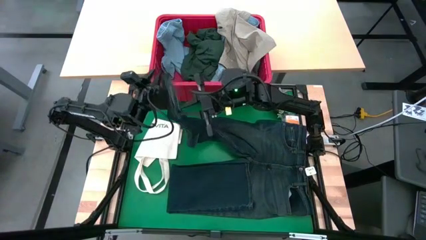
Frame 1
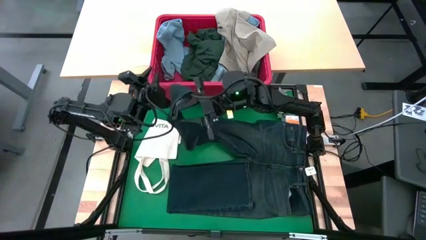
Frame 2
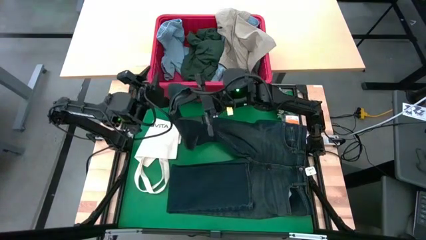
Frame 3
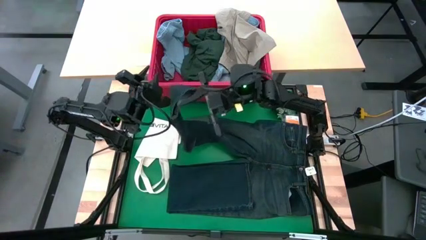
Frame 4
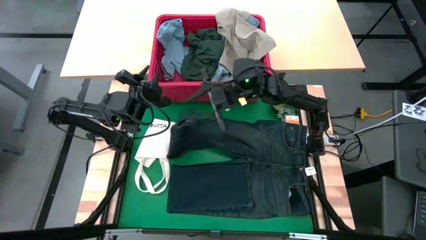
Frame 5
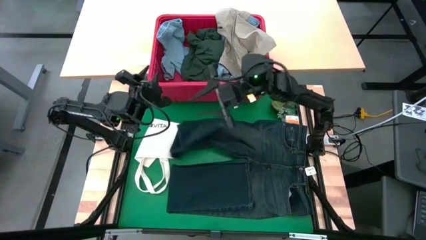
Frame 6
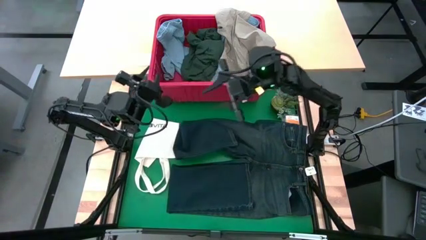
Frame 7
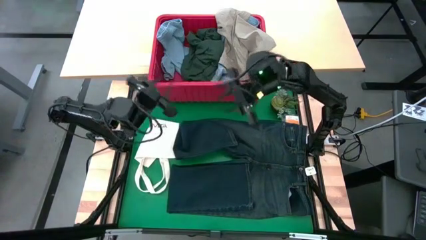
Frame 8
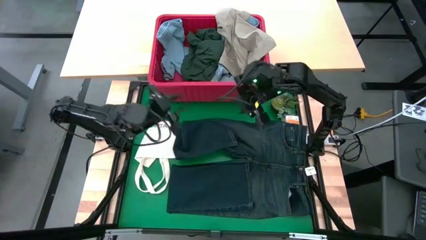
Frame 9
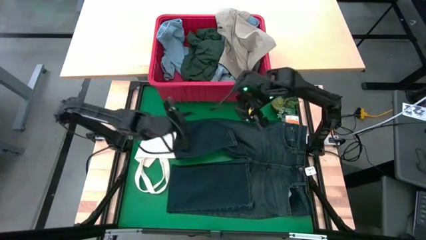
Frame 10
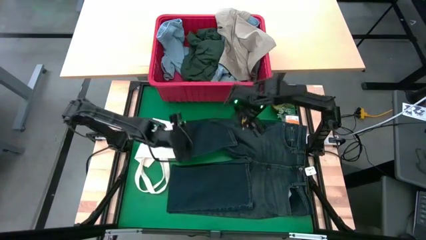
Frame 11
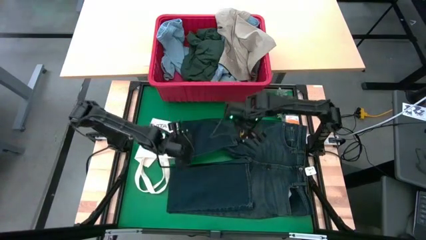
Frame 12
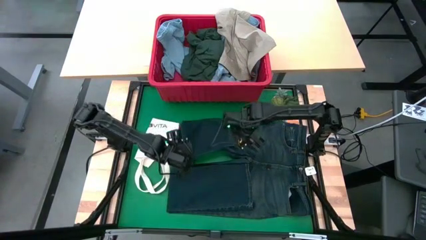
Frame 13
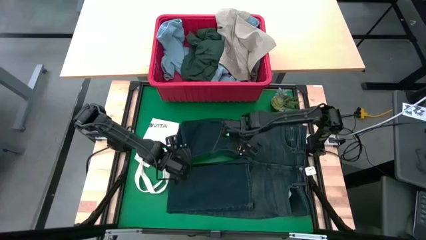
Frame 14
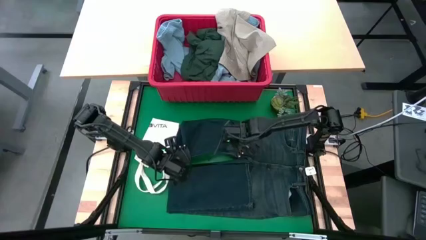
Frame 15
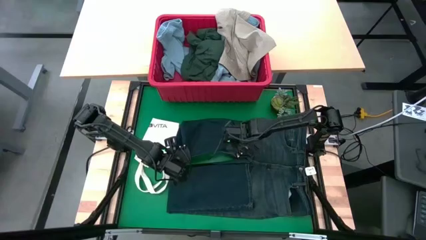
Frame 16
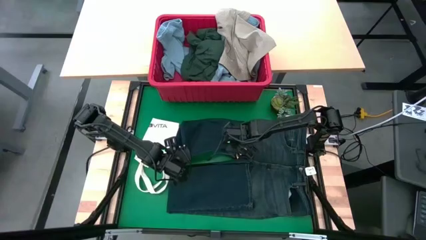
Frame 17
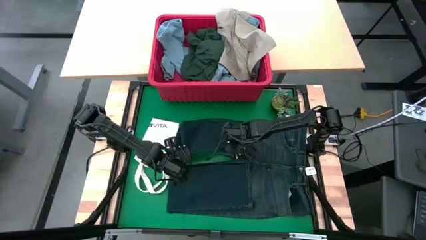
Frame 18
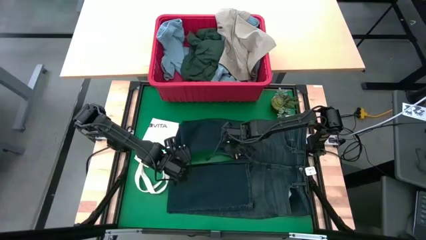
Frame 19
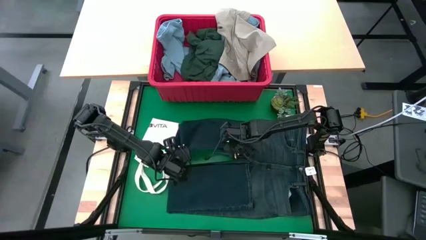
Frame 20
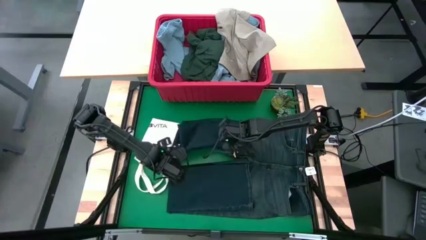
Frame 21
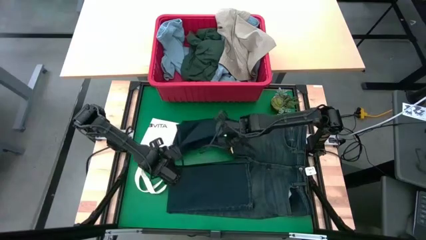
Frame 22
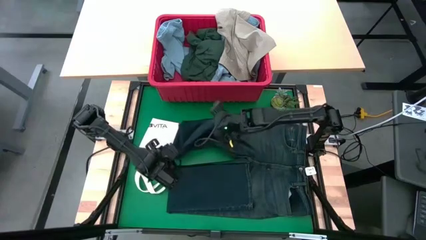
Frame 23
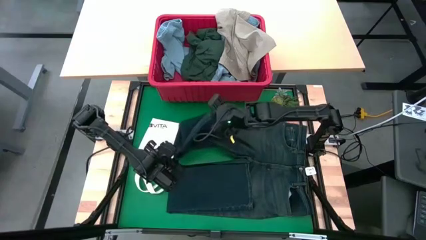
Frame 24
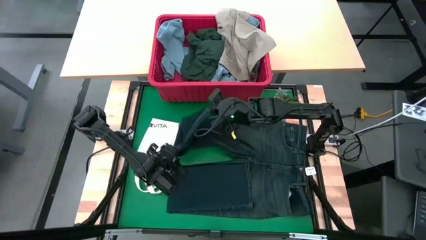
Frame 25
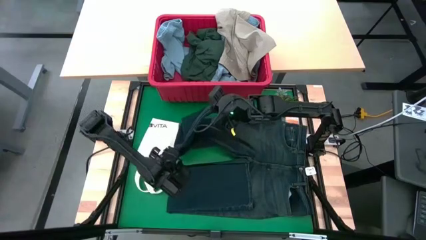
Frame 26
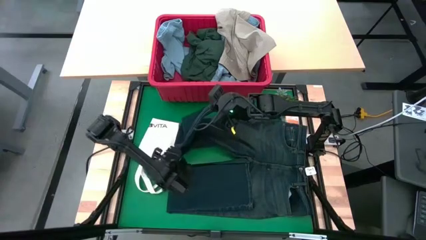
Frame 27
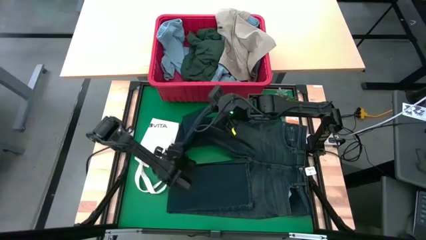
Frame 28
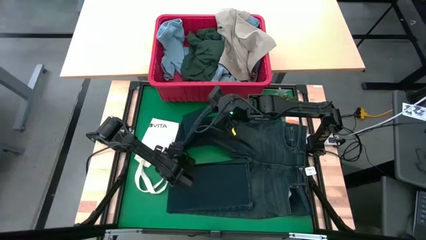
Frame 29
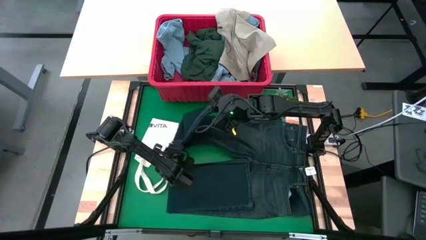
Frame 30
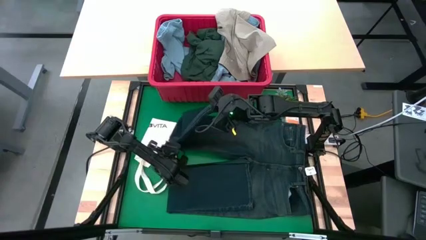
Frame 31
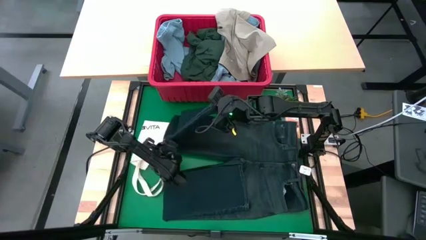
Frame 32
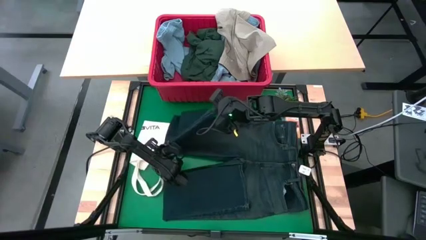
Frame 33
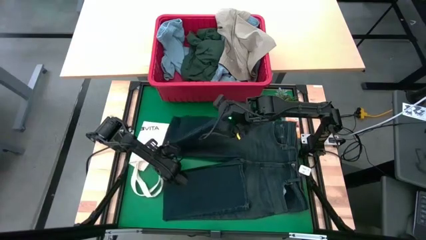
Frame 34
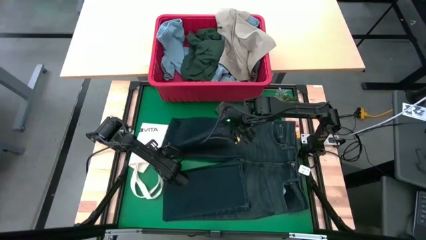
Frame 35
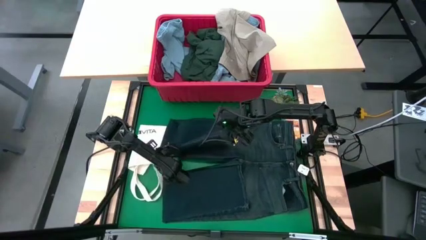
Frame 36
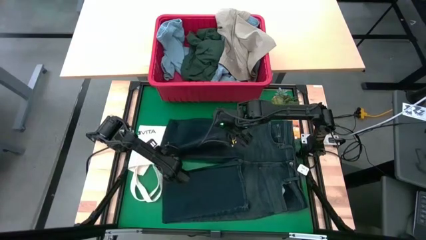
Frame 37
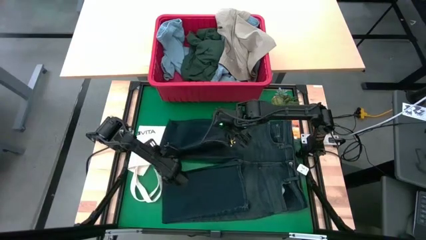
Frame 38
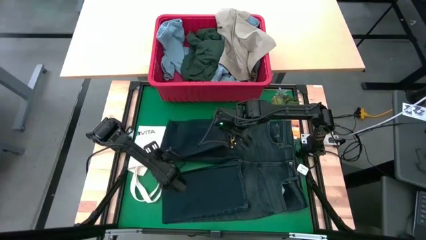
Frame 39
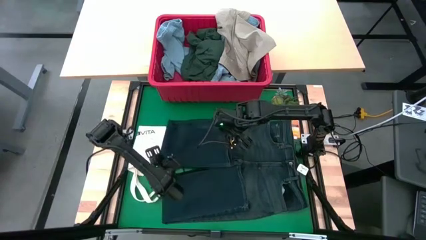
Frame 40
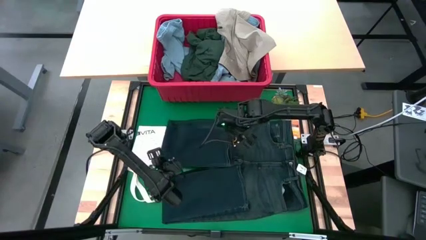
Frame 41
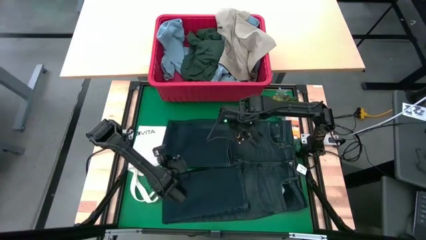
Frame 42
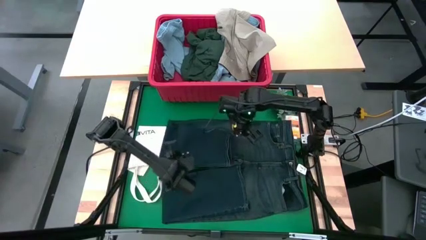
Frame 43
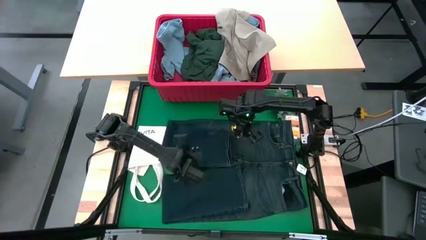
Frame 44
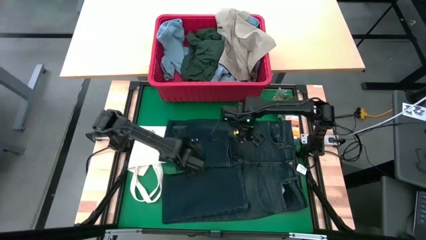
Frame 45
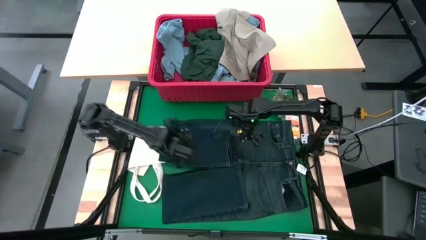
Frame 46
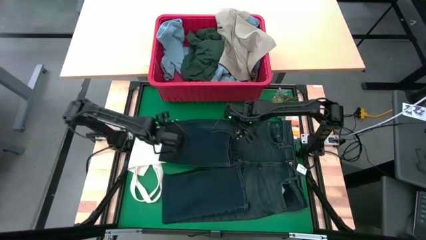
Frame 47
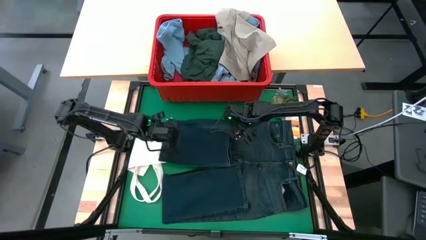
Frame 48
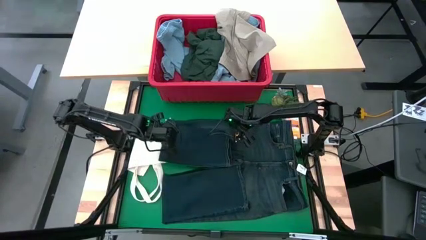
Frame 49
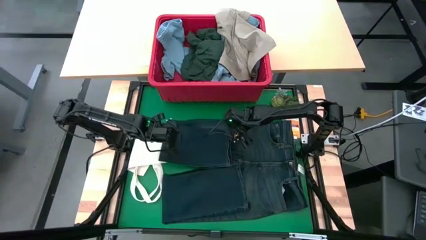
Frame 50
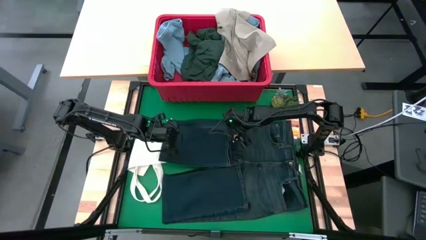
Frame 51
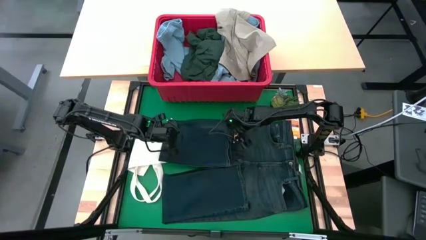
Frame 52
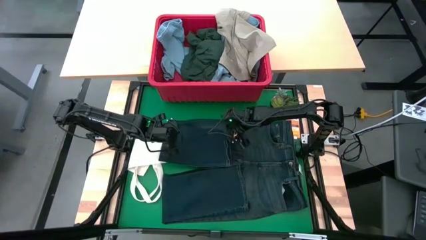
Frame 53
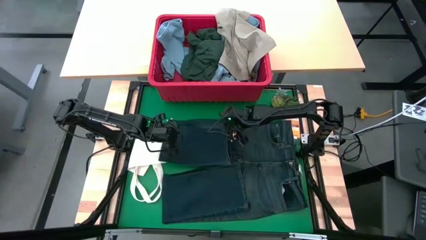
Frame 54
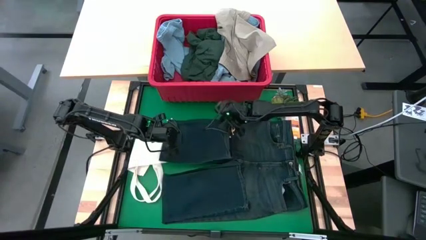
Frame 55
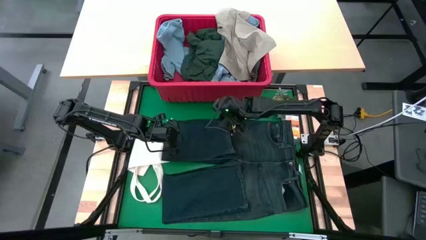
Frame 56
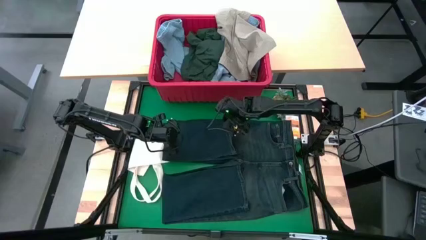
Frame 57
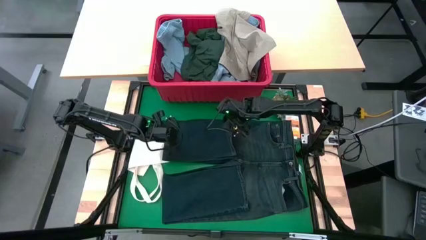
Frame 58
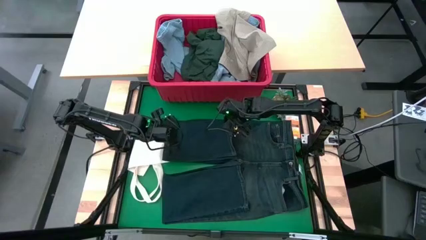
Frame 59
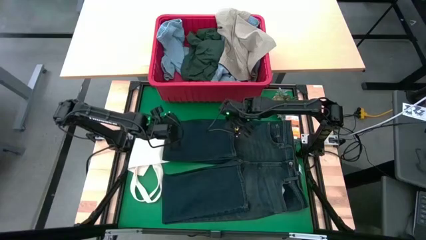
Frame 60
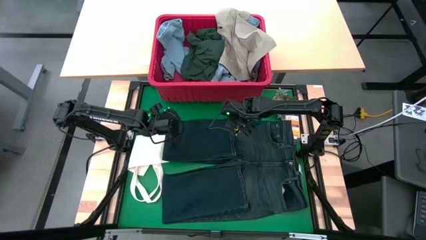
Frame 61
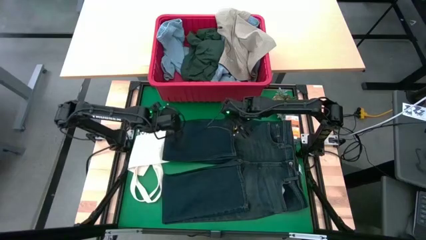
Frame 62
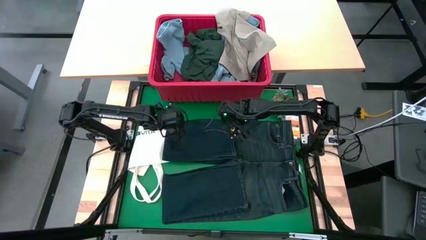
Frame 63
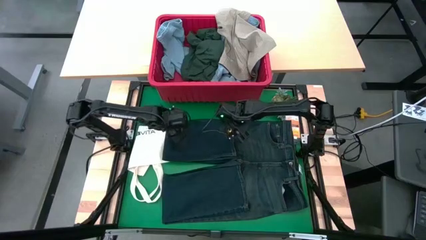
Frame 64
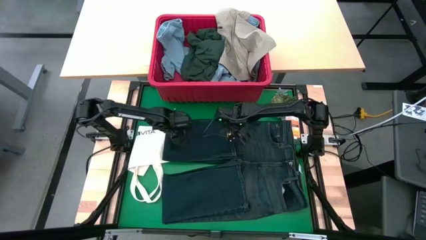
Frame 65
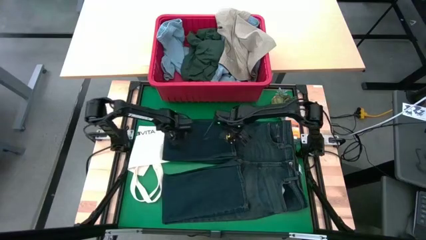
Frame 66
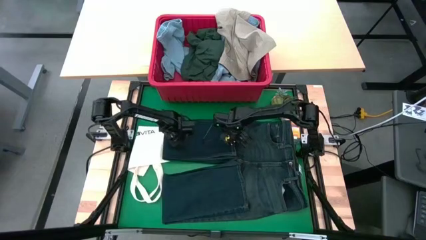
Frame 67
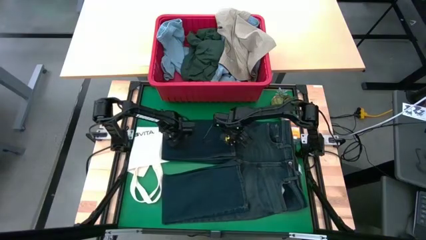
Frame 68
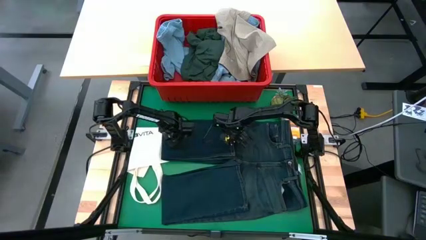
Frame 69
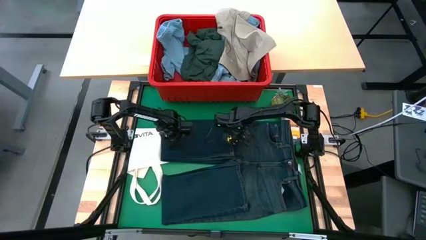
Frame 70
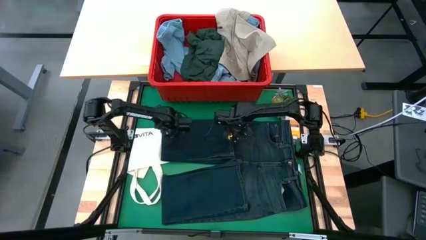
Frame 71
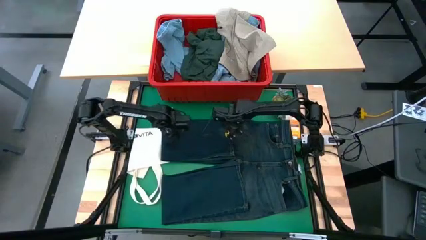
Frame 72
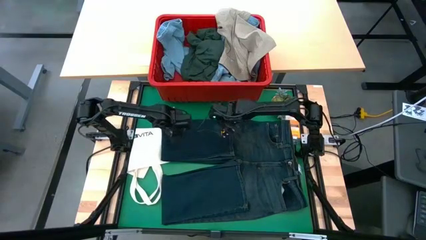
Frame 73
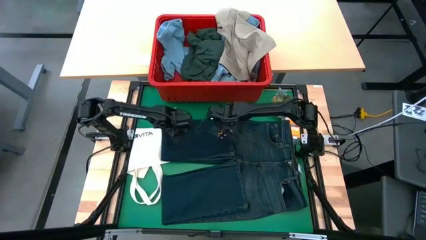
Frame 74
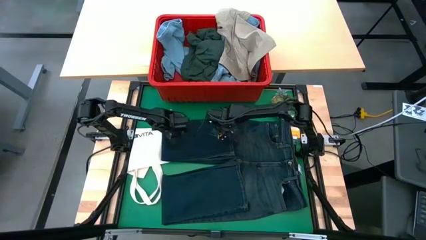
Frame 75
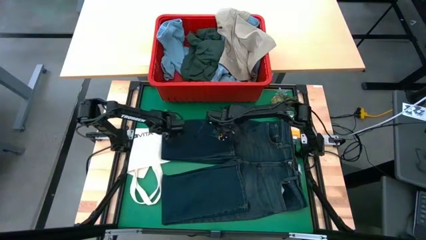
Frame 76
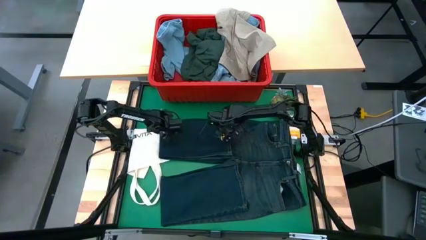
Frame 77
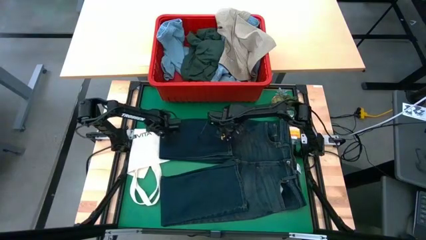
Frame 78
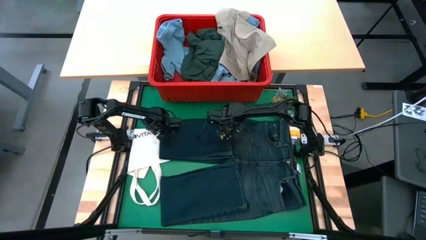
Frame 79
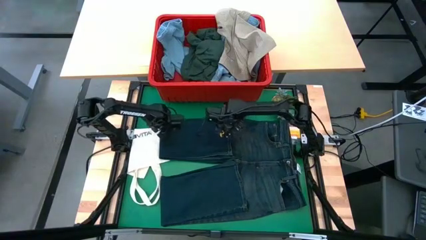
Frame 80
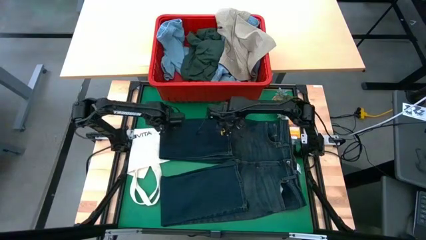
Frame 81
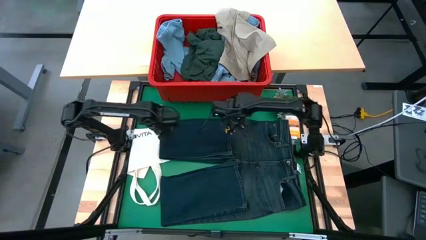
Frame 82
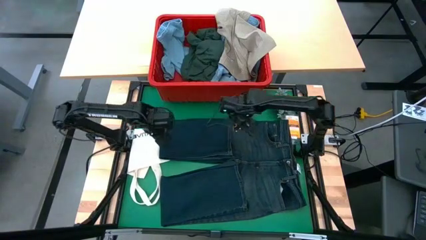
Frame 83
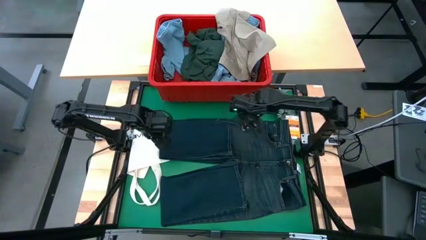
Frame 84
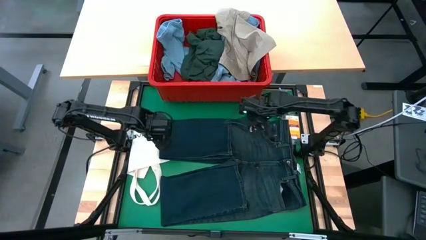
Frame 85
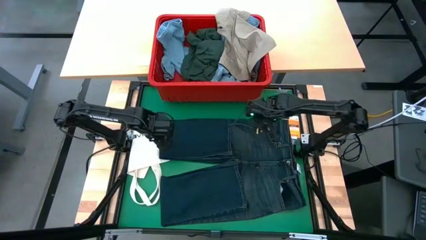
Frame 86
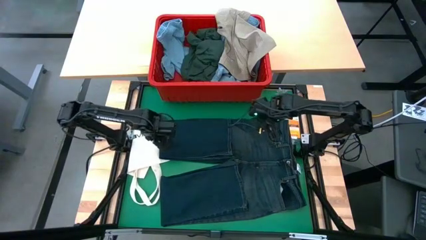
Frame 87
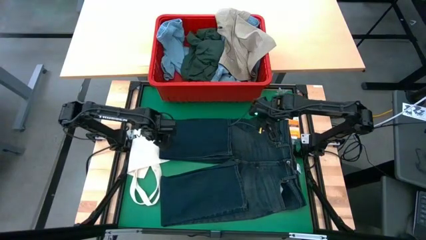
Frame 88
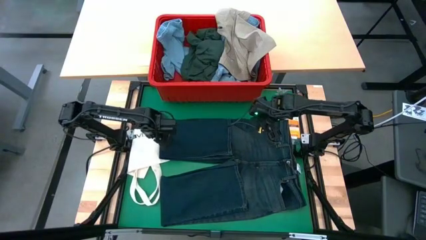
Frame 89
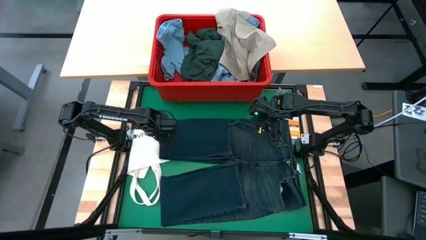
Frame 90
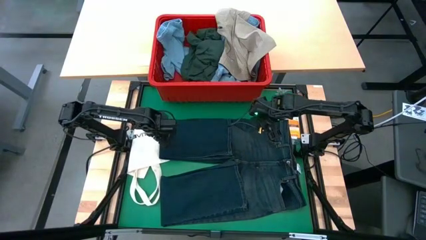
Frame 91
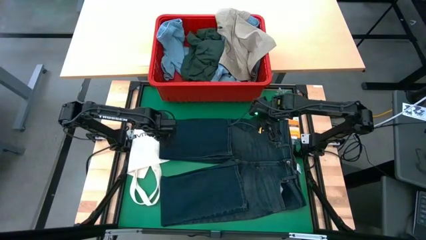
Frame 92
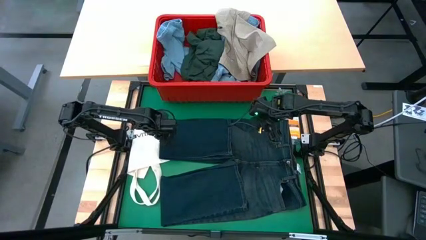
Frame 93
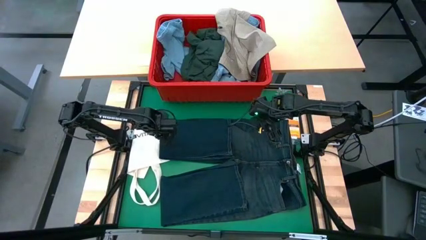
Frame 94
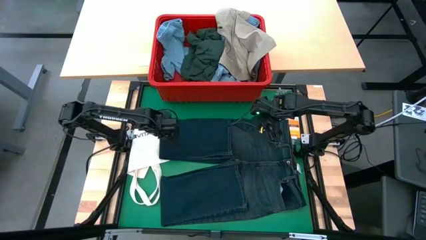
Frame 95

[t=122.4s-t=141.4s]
Task: Fold laundry
Fold the dark blue pants
